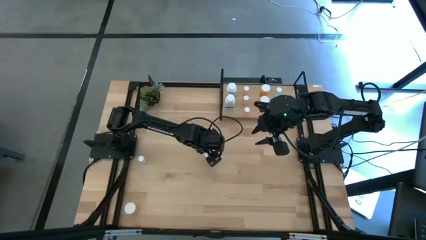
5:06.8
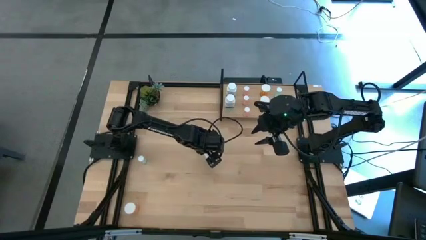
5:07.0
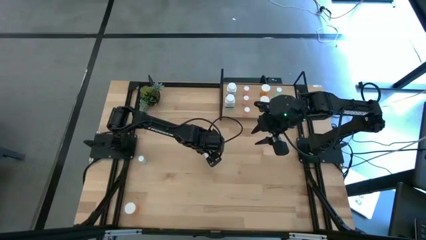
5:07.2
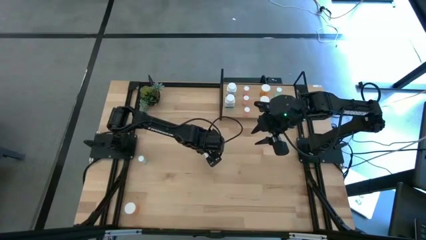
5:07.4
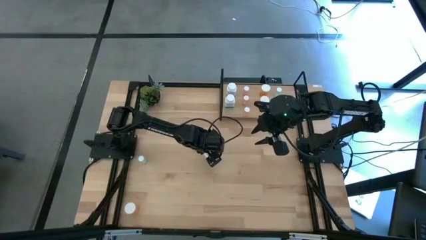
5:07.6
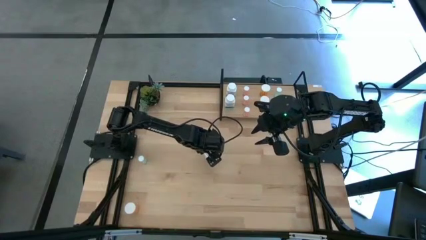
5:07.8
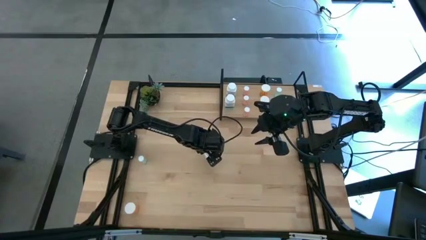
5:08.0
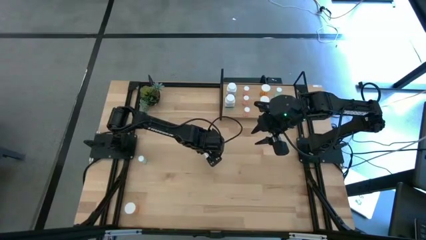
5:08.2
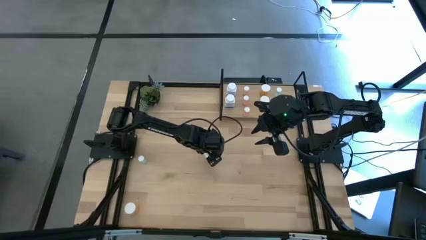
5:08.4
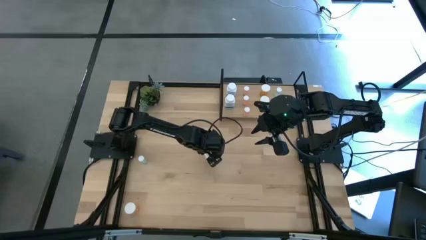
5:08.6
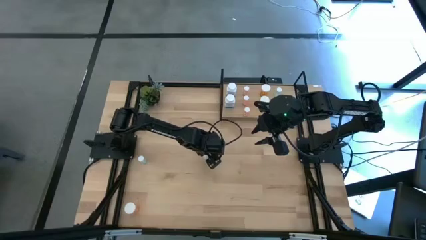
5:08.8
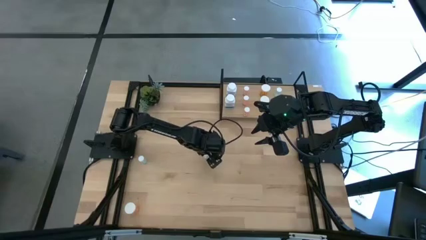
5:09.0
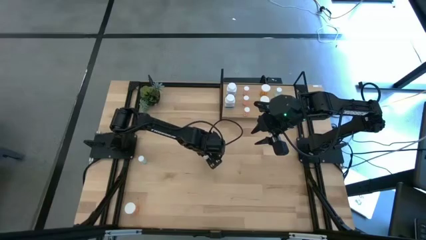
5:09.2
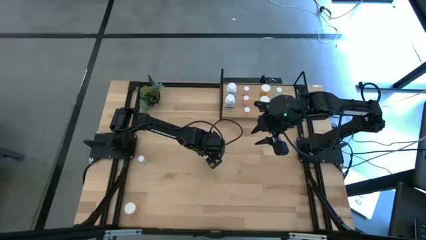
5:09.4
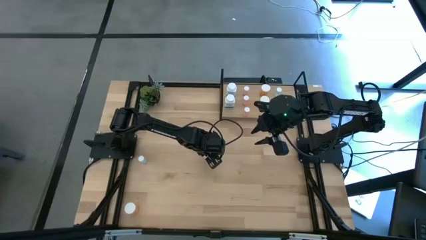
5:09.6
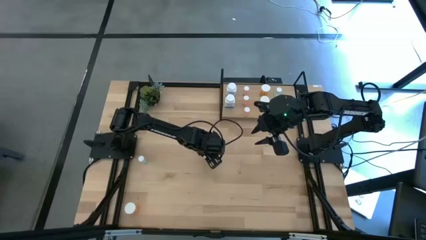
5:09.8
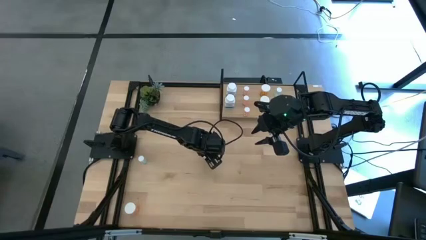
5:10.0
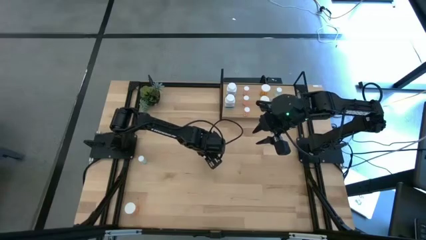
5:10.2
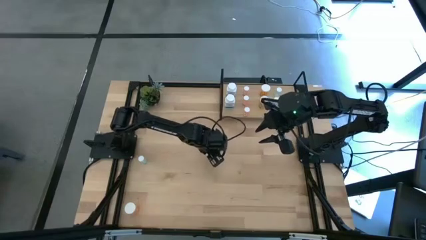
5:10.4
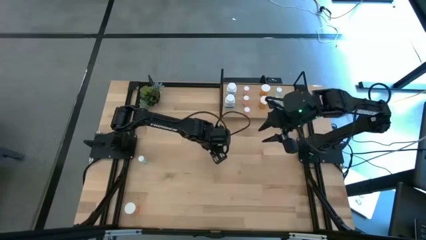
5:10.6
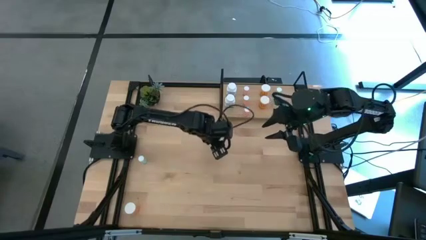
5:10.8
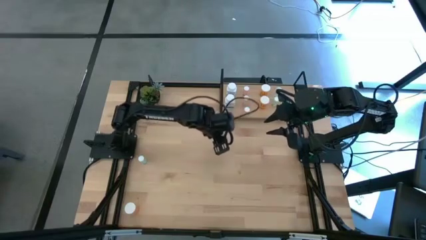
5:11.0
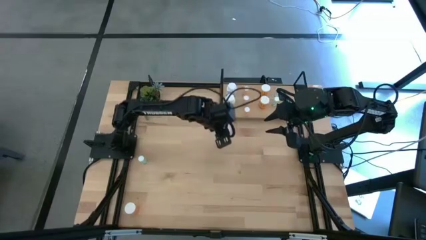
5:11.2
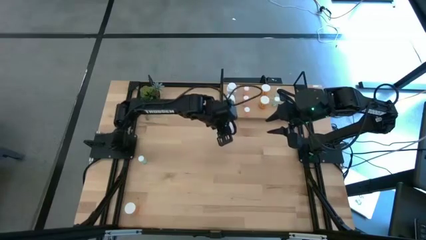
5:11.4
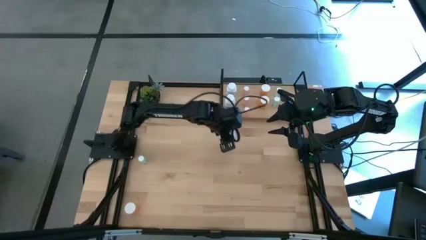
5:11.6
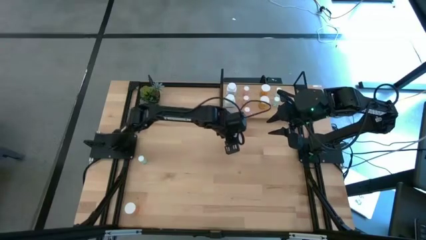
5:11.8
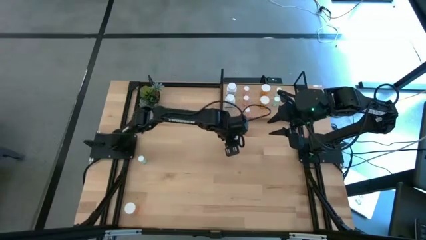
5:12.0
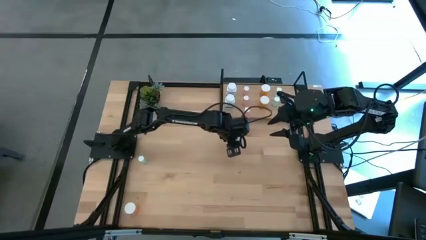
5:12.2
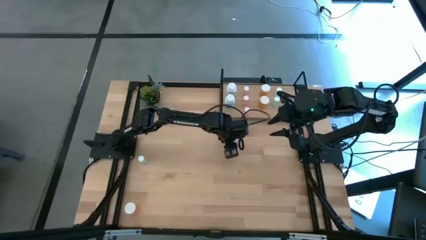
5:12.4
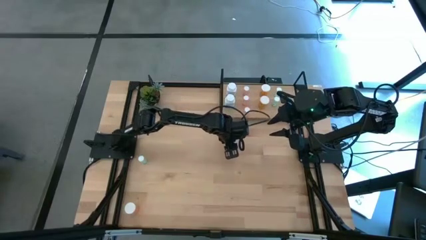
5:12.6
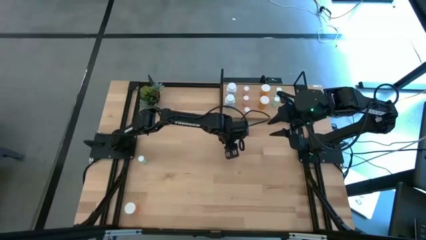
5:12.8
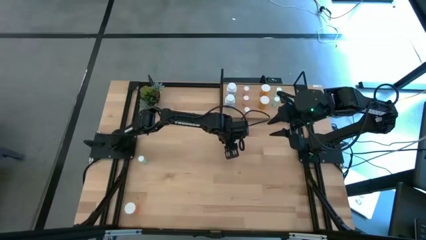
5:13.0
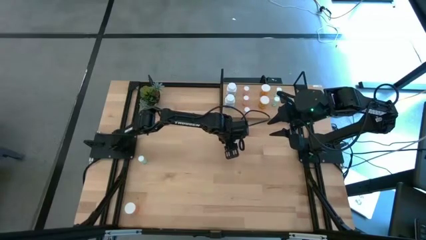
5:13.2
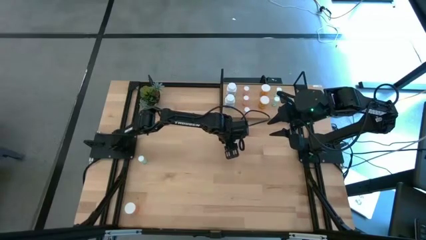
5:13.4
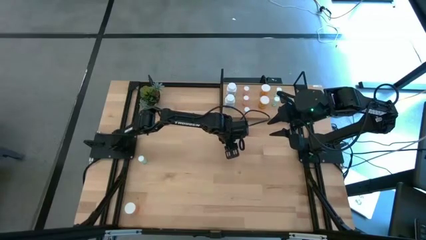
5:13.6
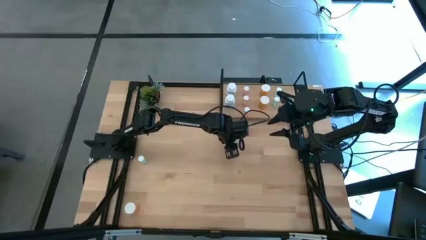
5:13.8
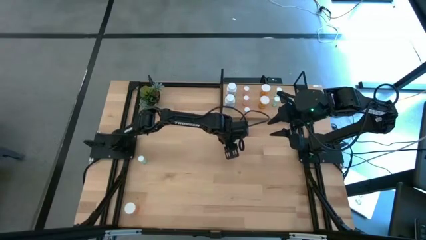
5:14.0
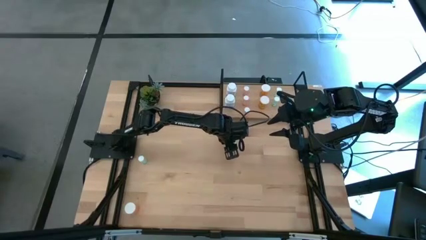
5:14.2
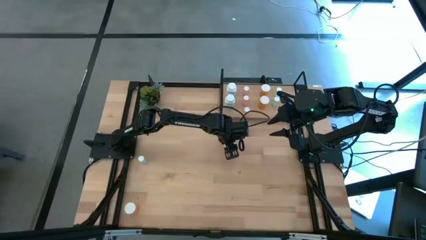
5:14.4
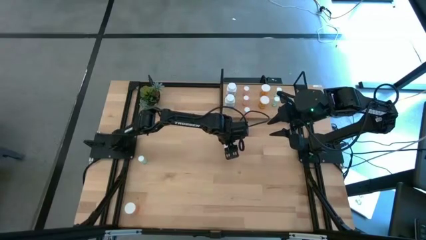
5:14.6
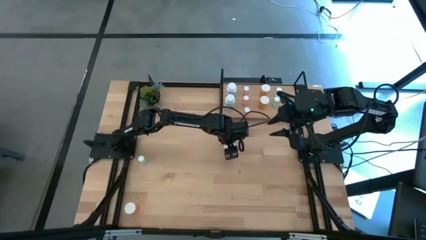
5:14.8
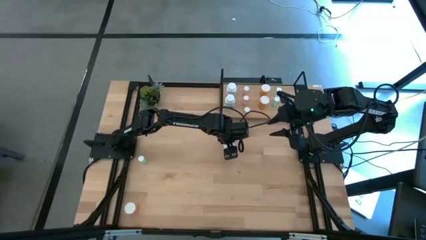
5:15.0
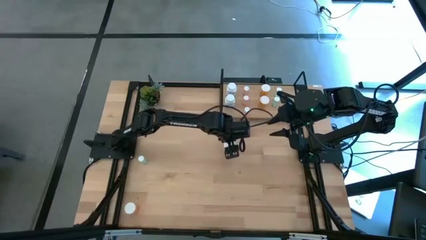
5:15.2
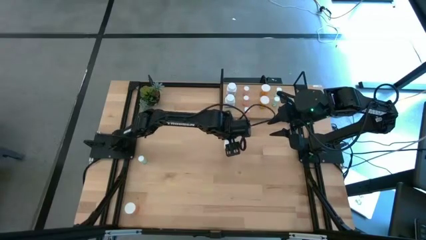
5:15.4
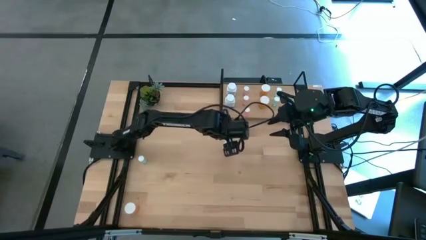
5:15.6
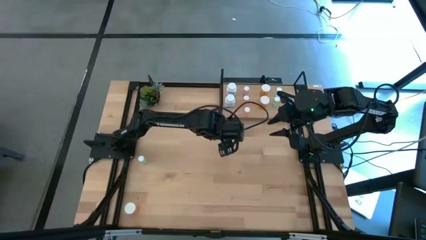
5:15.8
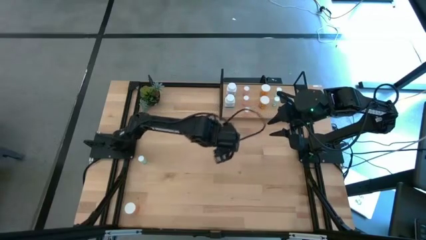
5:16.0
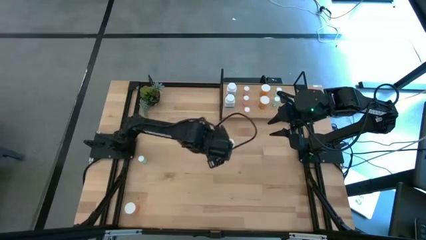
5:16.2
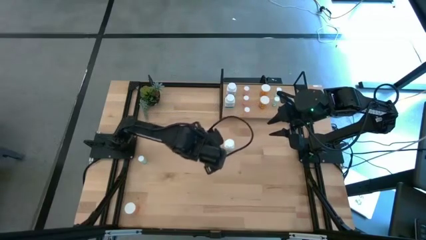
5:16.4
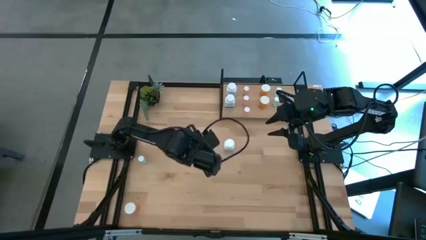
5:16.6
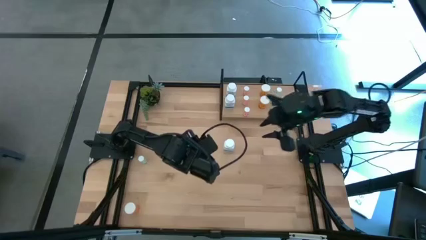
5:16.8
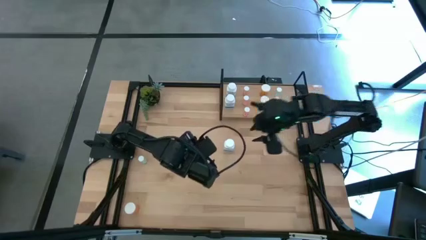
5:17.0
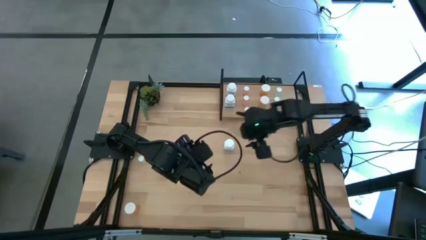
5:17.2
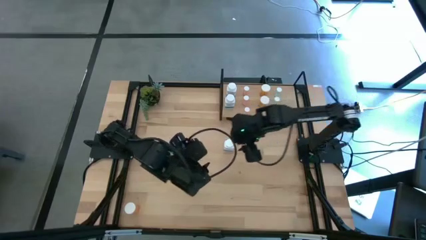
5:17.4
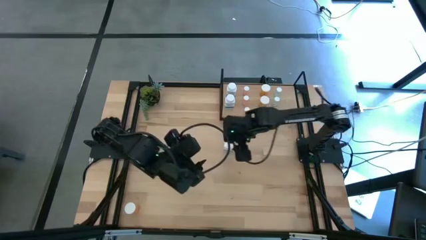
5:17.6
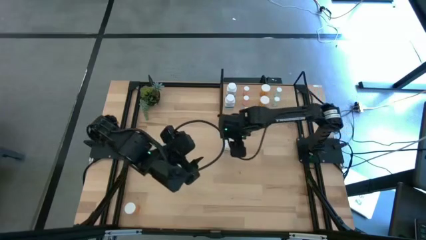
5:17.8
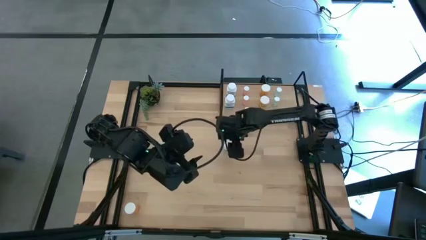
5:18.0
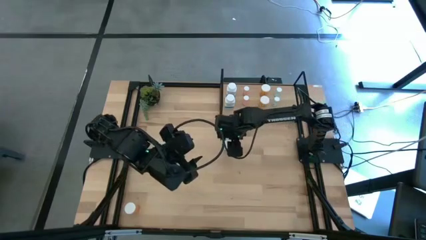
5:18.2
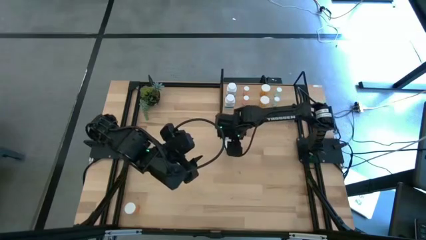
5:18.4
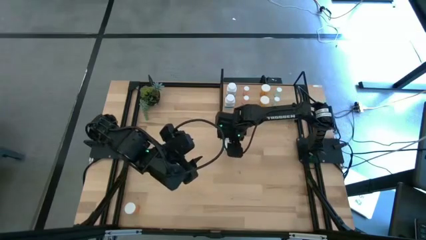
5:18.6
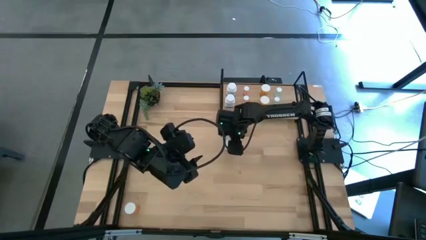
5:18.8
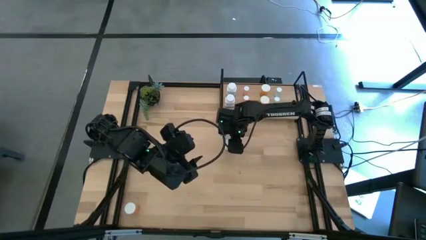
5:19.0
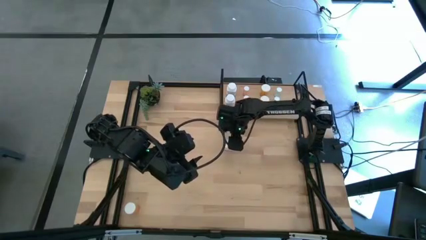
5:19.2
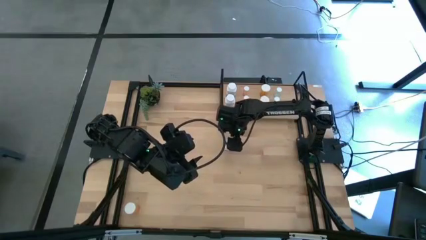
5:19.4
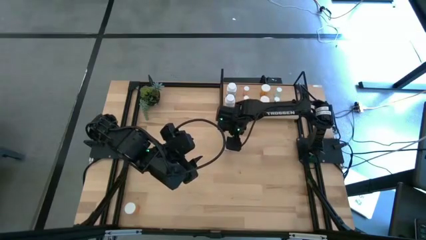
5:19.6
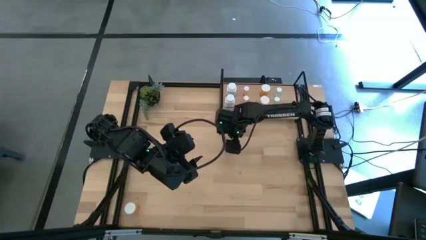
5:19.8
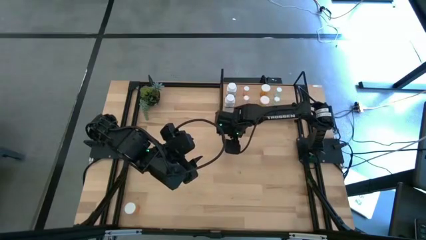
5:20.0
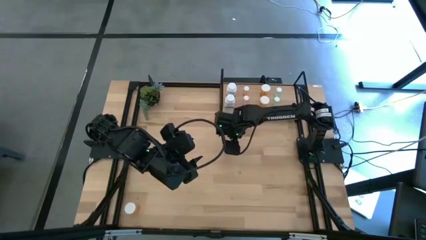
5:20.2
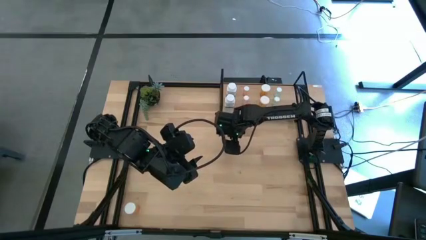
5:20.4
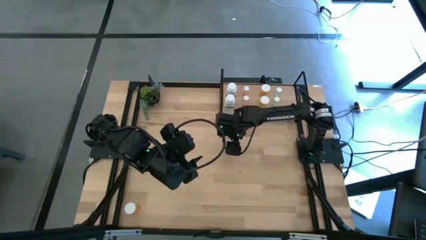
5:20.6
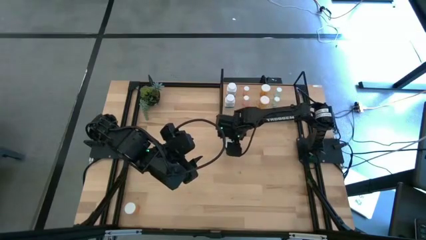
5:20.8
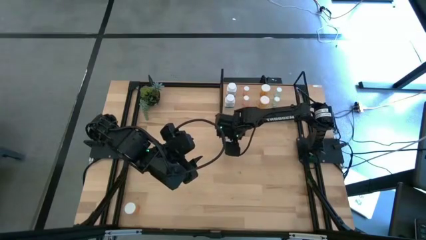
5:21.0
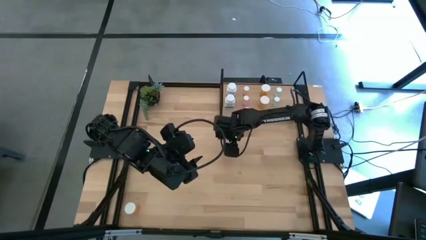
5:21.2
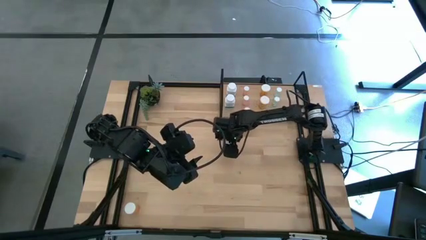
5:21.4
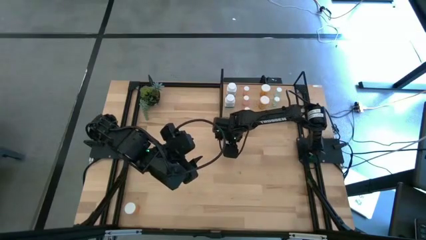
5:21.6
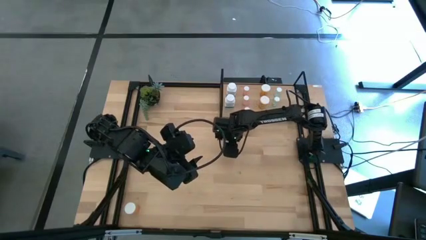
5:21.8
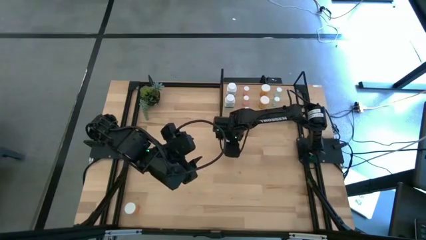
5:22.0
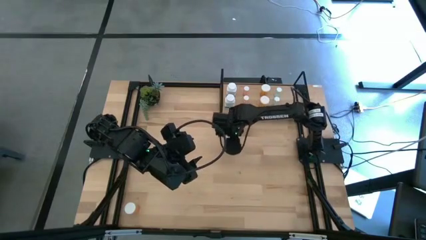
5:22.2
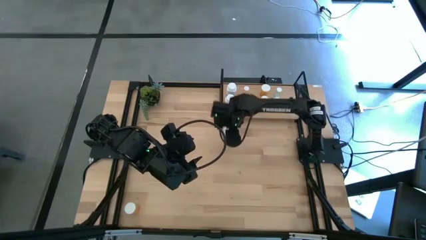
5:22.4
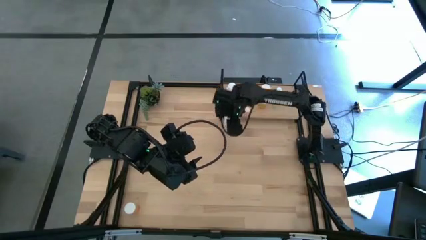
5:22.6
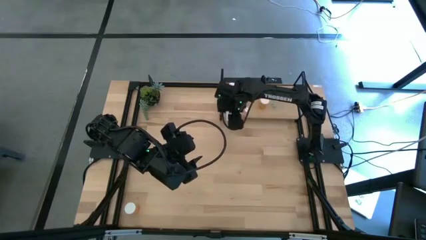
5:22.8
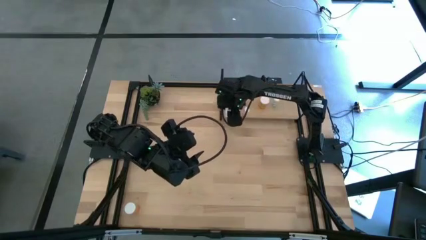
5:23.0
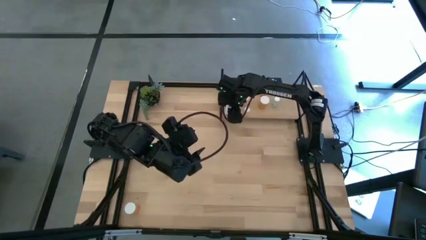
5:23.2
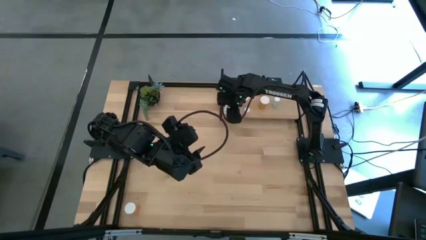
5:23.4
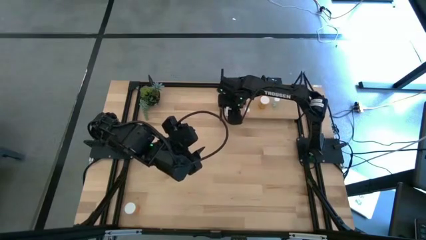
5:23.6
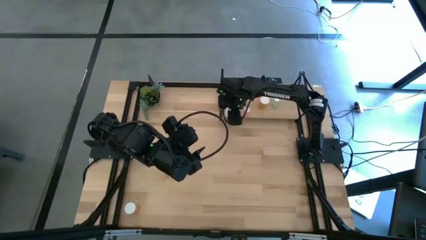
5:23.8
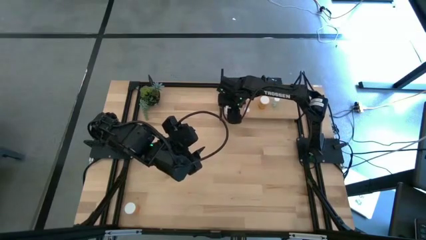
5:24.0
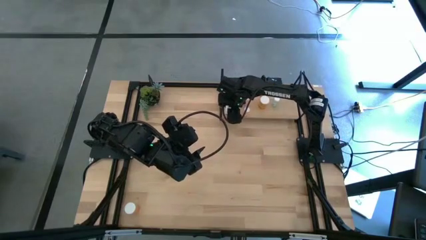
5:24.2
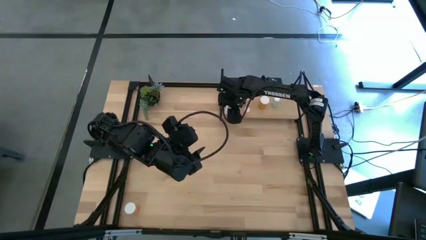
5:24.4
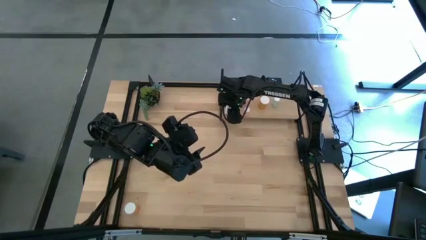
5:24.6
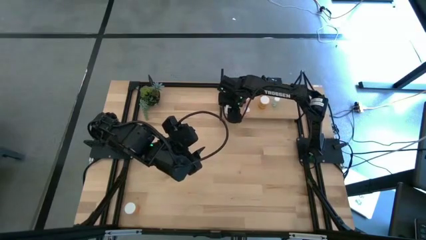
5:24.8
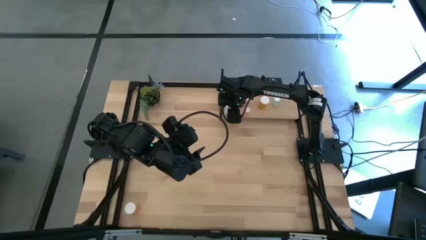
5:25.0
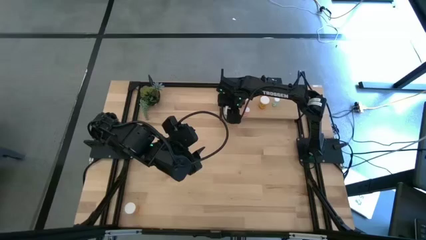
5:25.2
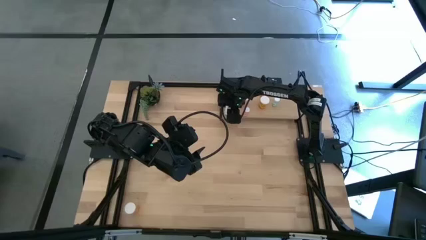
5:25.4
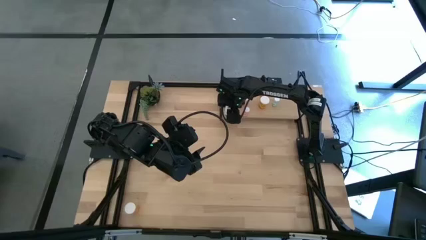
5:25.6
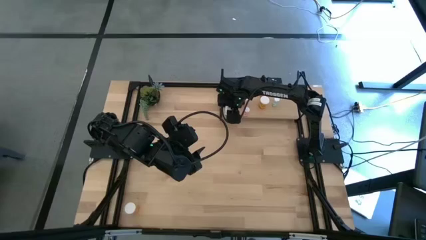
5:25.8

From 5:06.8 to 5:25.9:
Task: Pick and place medicine bottles onto shelf by color
Put the white pill bottle on the shelf aligned with the other white pill bottles
